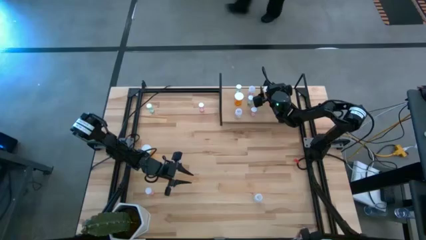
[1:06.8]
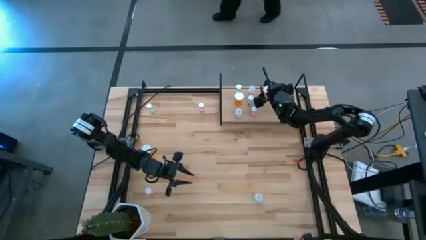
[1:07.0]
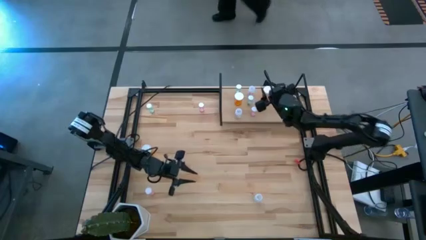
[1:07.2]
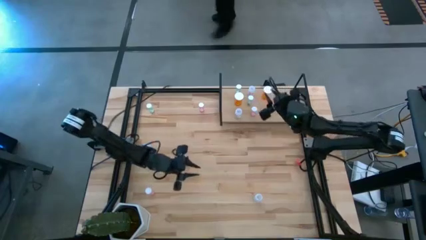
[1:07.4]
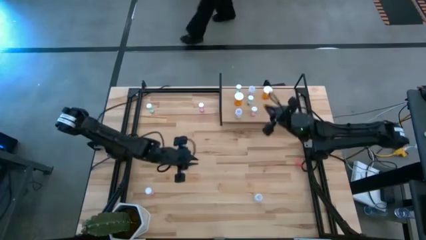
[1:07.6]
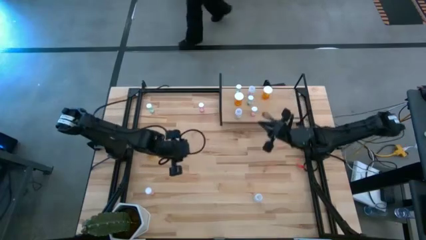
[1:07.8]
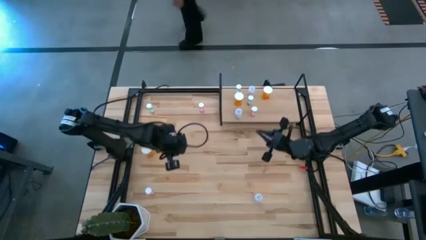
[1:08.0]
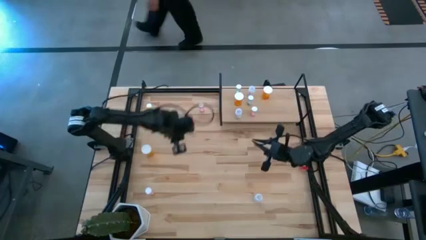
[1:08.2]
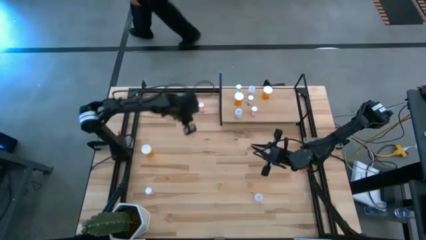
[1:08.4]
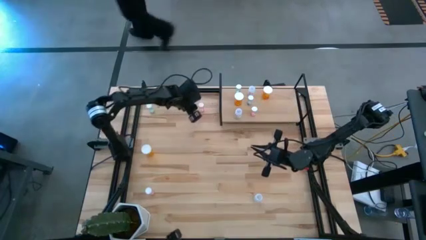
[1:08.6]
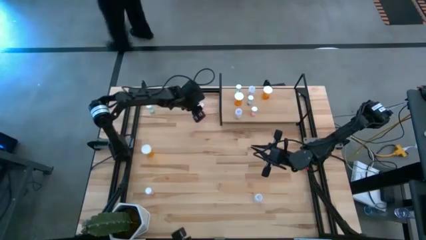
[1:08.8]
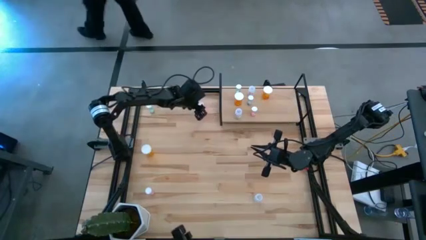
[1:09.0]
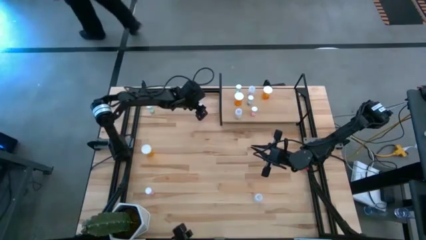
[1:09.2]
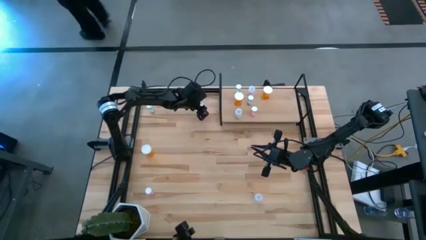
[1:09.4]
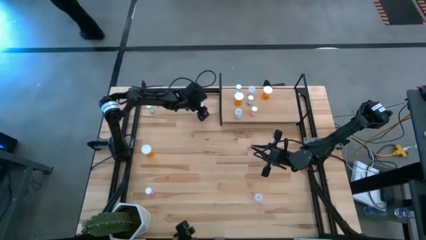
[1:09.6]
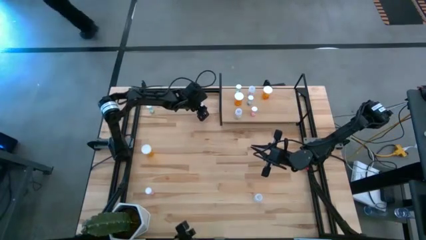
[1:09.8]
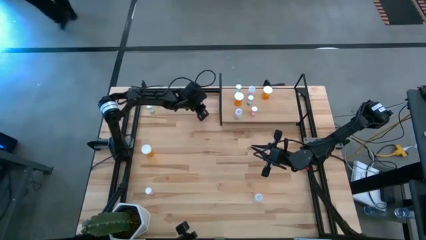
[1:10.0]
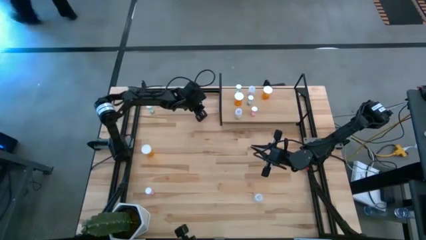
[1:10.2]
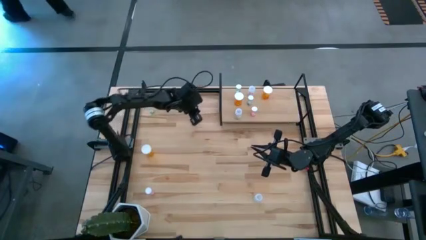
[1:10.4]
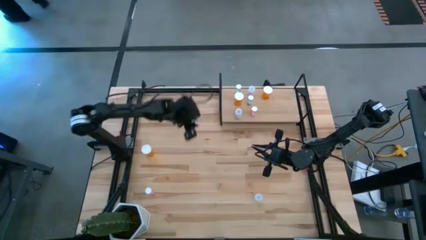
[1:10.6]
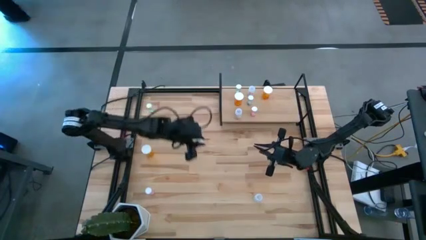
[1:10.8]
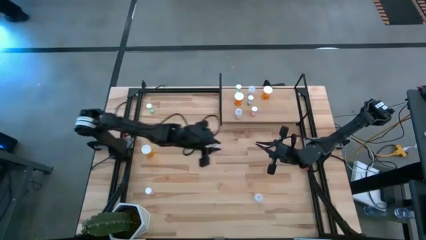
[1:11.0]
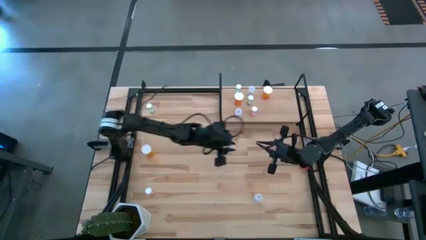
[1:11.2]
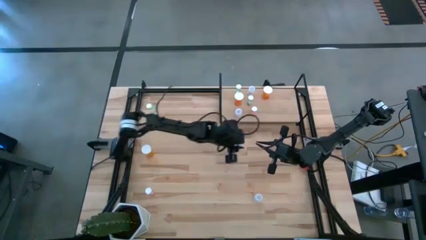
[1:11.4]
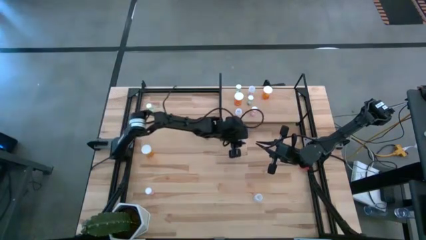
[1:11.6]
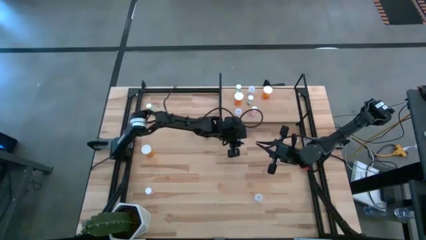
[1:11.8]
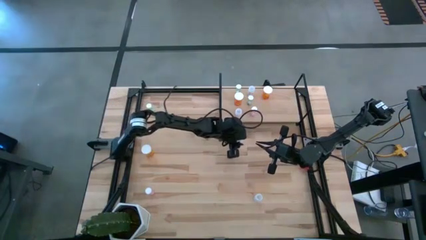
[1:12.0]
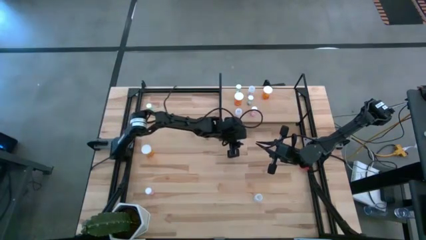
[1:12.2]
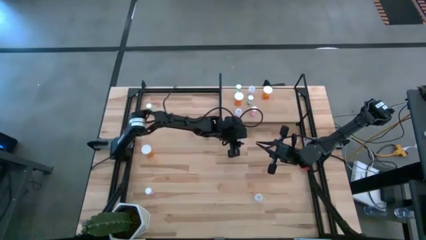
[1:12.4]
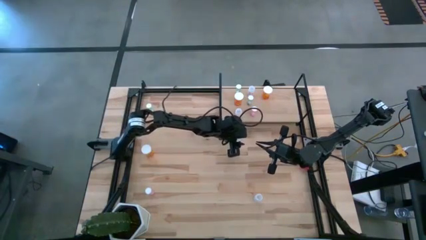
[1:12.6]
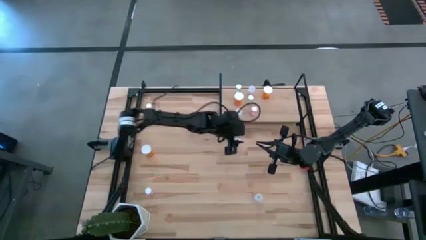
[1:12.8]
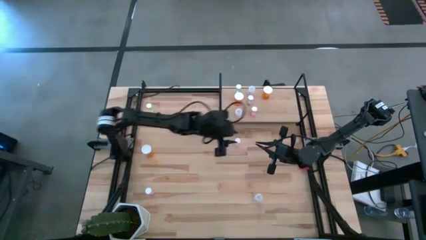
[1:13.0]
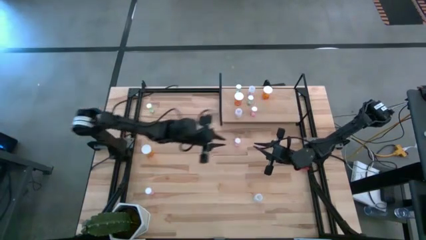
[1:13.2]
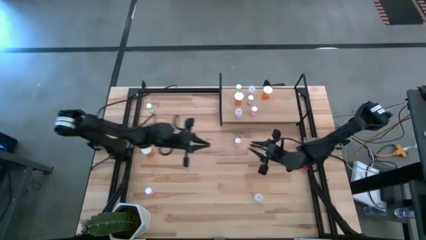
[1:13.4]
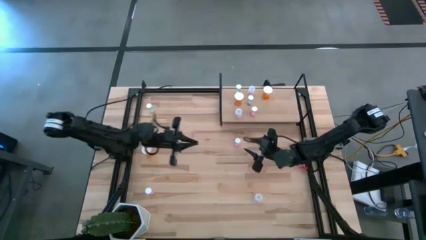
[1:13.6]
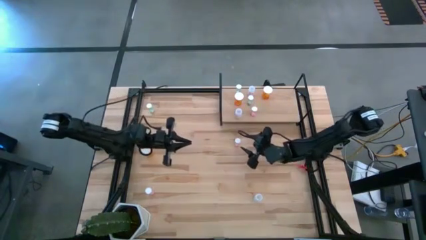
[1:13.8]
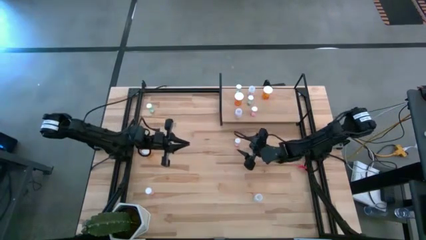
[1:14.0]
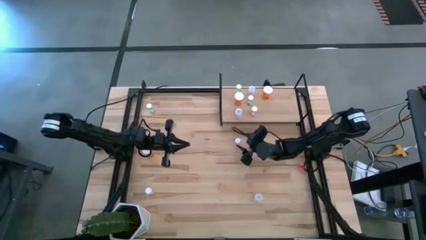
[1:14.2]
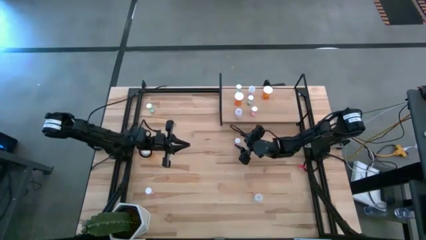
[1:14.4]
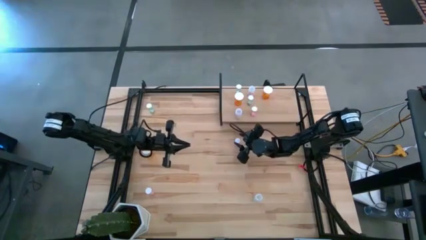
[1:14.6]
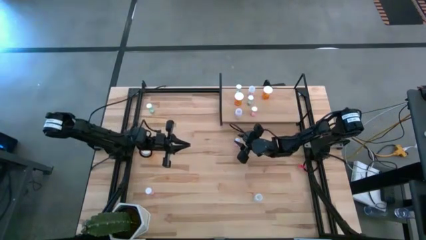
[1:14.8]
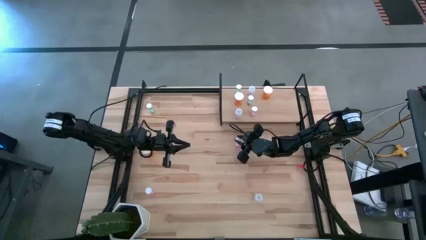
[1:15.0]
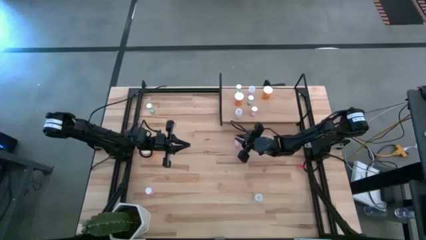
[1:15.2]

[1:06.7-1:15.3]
Task: Pick and place medicine bottles onto shelf by color
Put the top pink pill bottle on the shelf

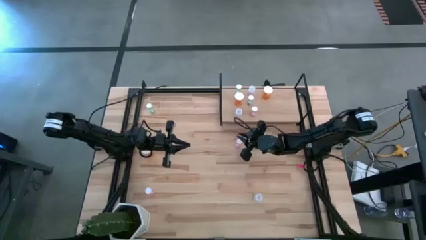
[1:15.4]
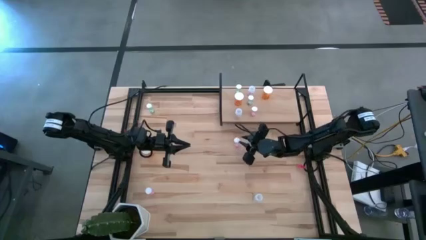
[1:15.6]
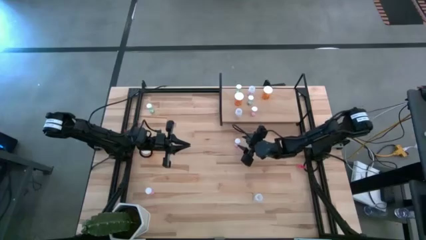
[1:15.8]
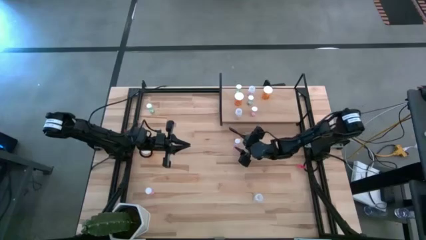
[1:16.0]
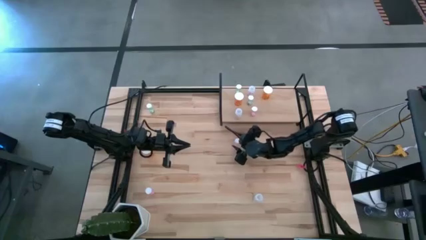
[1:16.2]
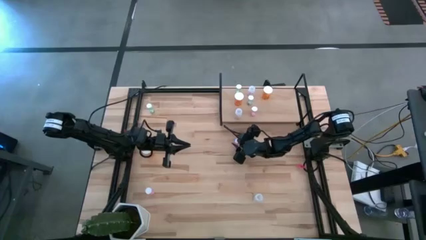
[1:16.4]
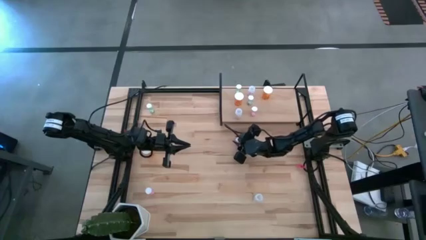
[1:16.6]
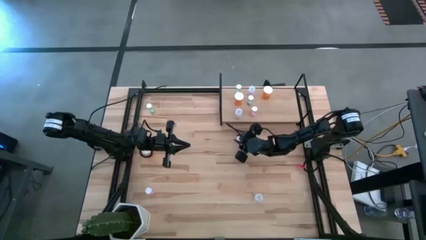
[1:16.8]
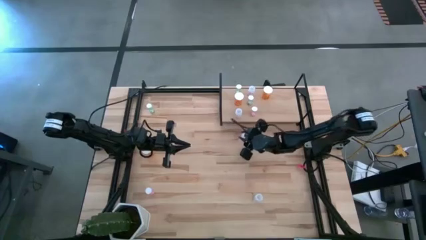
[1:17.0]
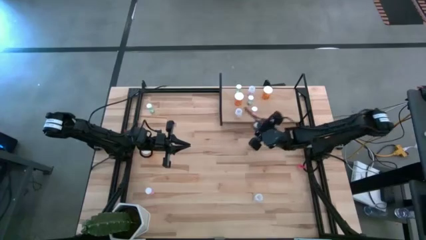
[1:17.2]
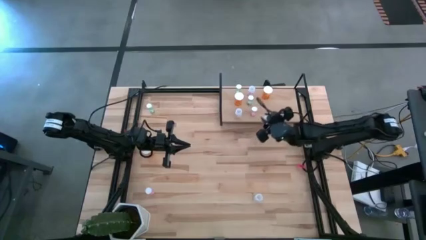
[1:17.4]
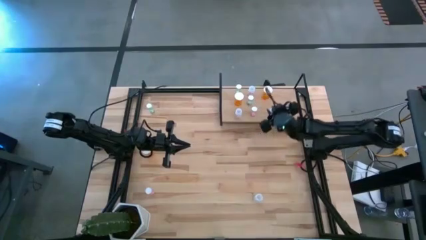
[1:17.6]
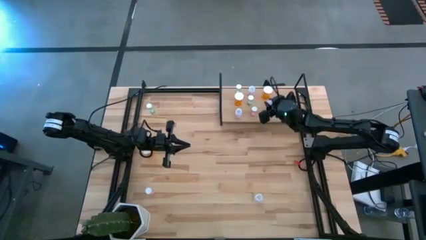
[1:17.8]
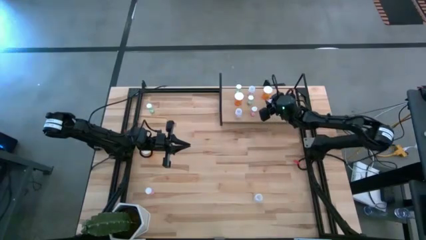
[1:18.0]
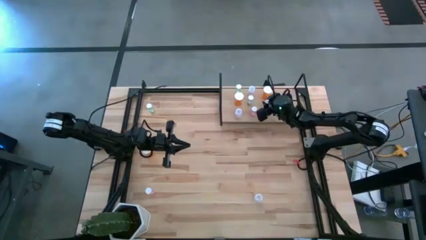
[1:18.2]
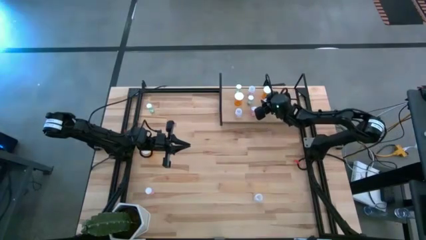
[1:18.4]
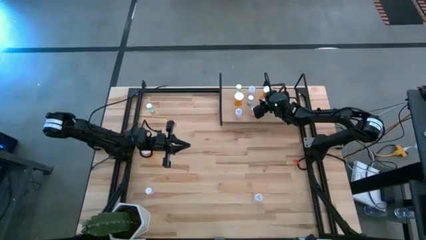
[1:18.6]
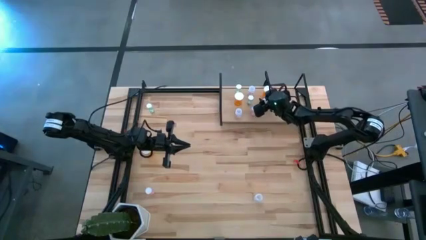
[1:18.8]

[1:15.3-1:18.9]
Put the top pink pill bottle on the shelf

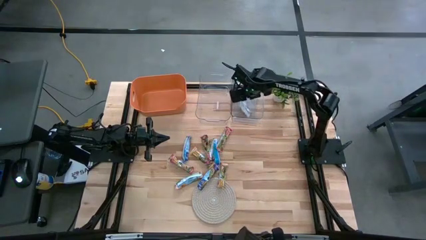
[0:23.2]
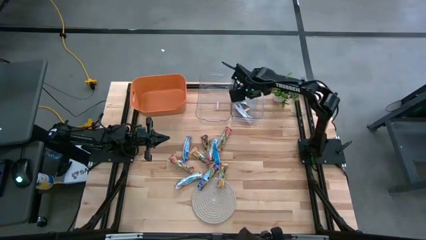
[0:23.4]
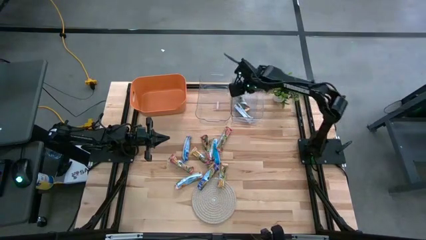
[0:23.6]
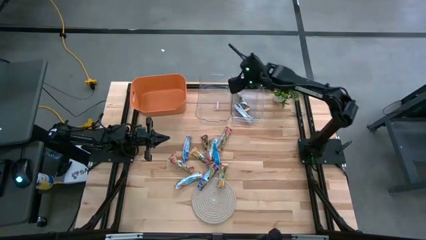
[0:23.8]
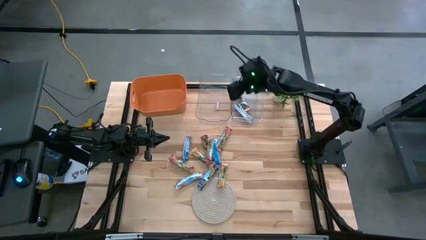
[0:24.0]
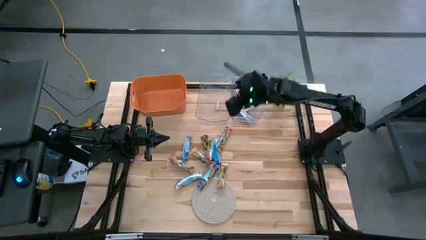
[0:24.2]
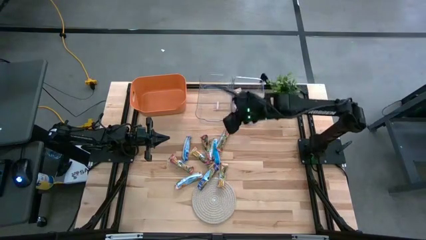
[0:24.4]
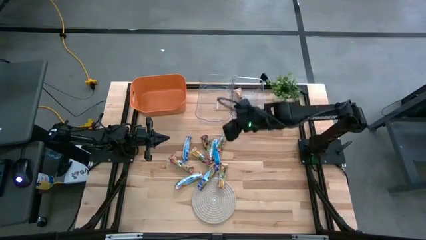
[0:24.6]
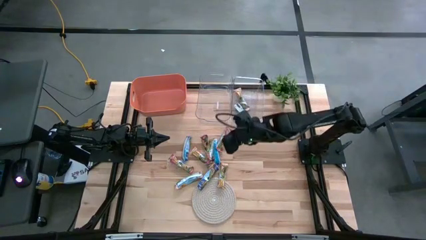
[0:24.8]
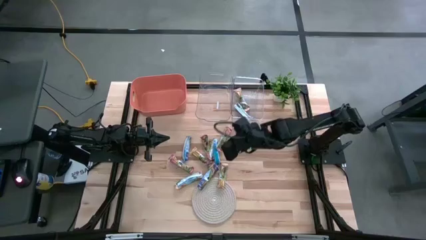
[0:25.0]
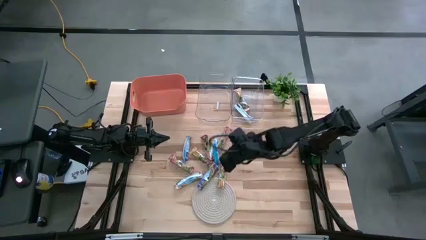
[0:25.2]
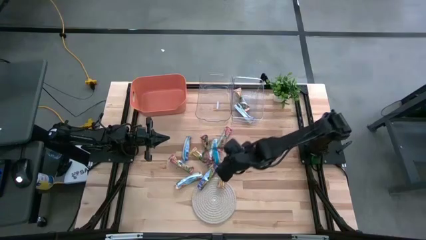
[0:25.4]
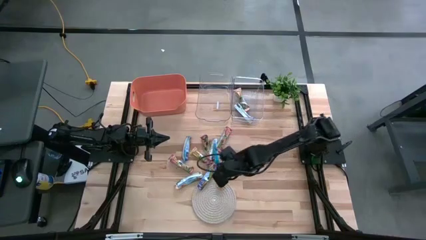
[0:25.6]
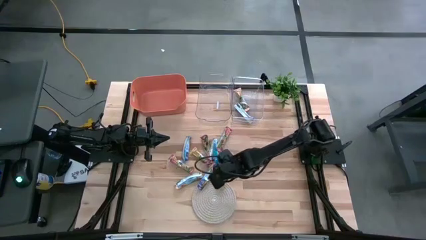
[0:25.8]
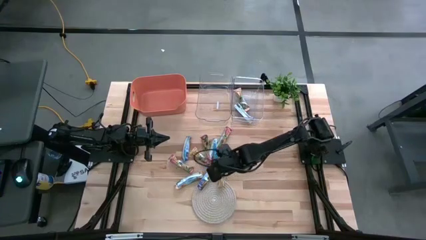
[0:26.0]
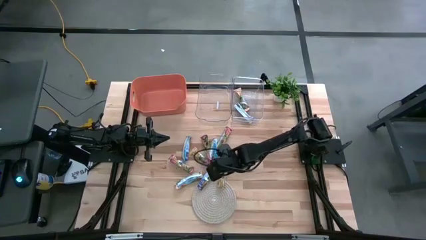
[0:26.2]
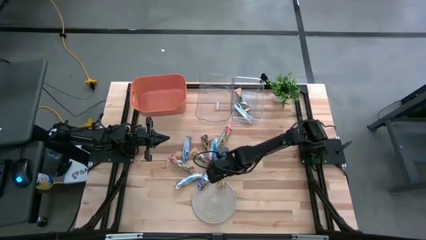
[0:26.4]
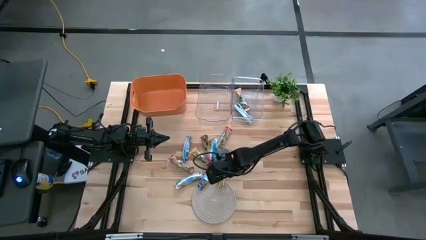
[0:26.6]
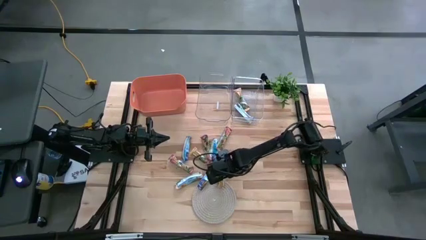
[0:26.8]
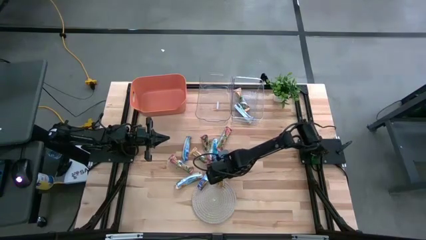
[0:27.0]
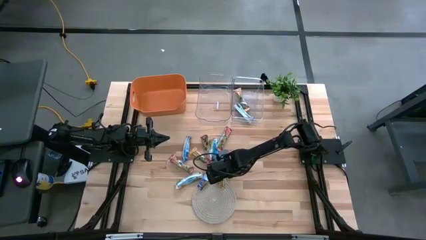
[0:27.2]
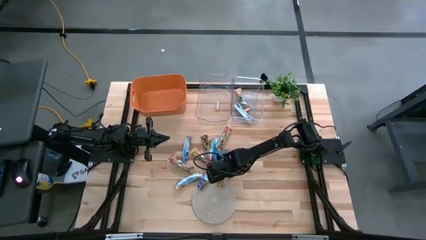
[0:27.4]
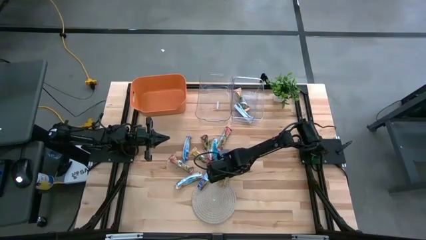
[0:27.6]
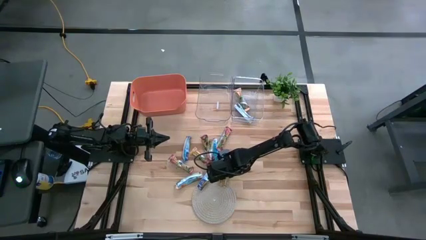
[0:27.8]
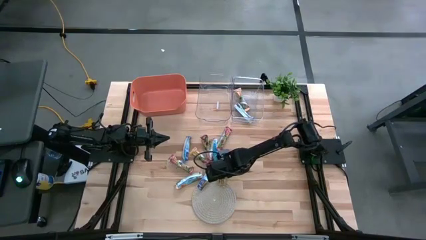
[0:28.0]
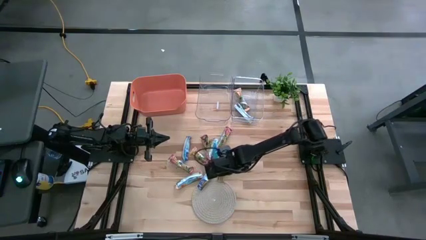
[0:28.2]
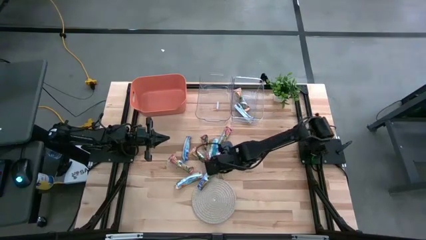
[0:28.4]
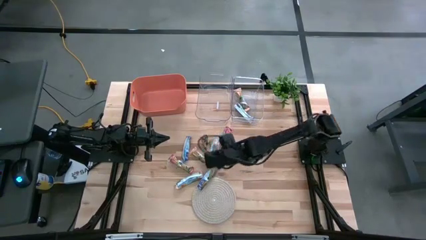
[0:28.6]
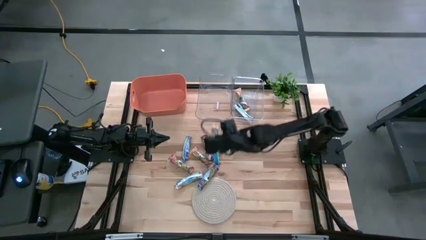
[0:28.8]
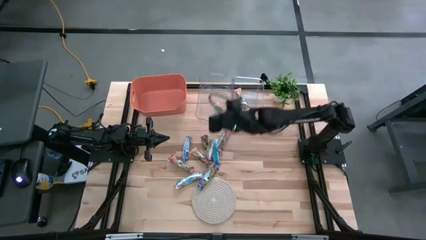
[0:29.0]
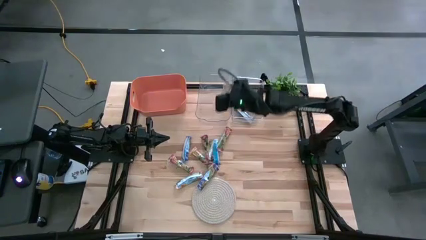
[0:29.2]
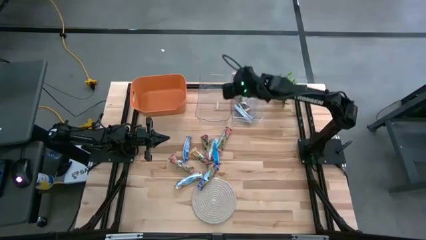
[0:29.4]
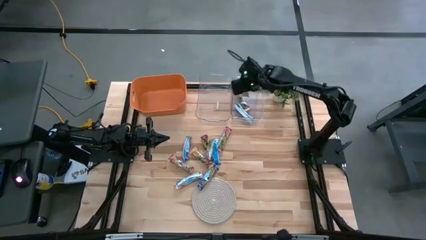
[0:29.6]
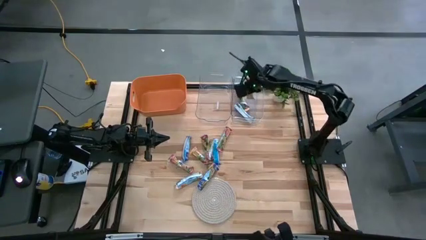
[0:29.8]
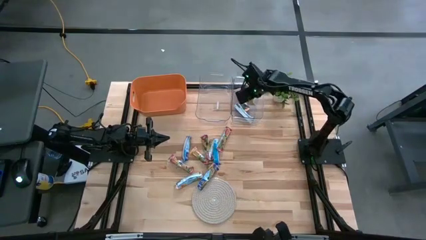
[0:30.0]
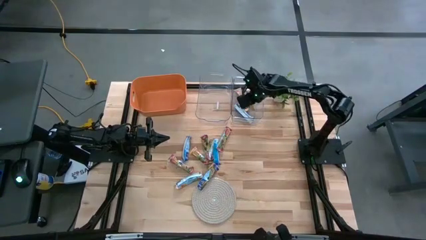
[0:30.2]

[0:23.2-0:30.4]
Task: Pick and place Granola Bars by type
Put the yellow granola bar into the right transparent bin
